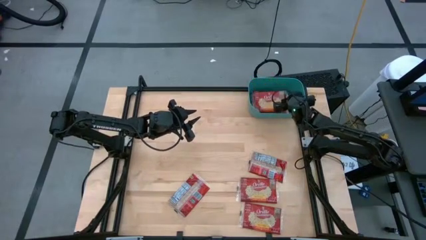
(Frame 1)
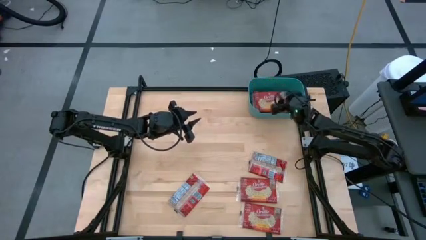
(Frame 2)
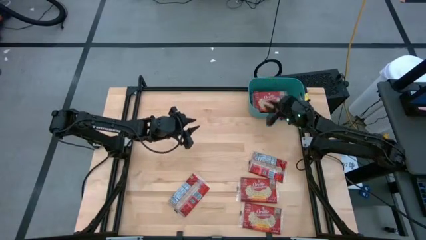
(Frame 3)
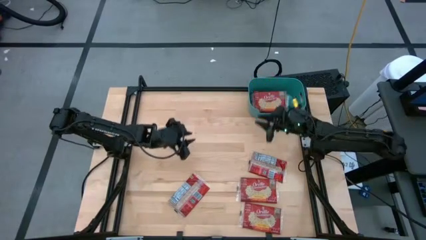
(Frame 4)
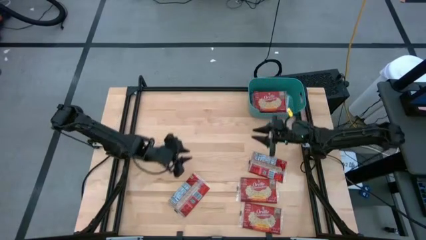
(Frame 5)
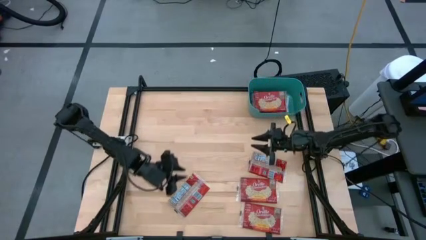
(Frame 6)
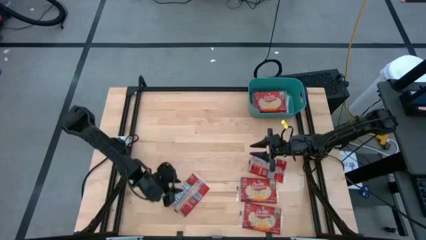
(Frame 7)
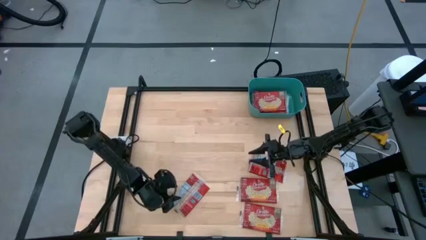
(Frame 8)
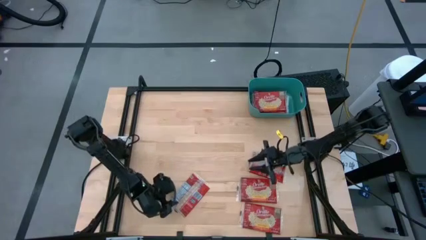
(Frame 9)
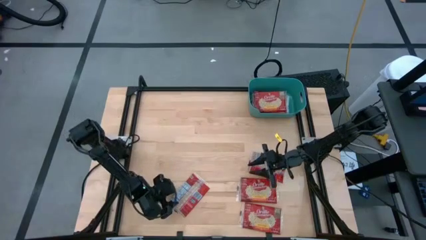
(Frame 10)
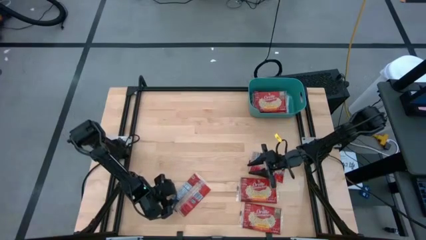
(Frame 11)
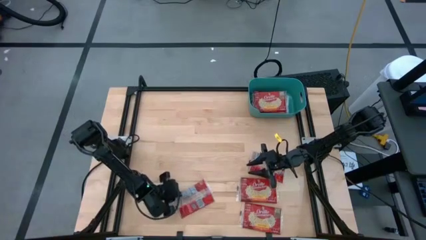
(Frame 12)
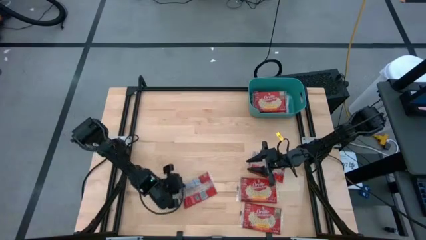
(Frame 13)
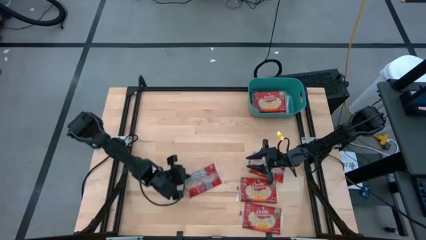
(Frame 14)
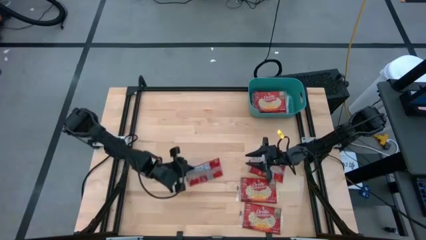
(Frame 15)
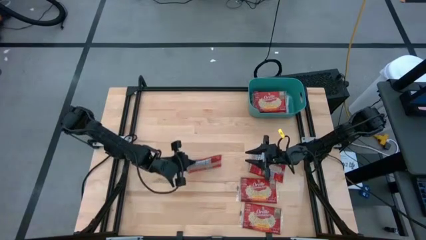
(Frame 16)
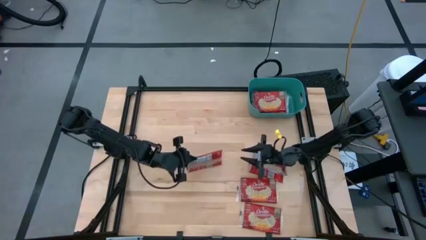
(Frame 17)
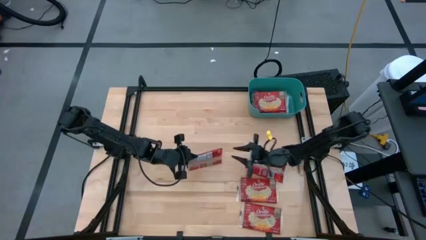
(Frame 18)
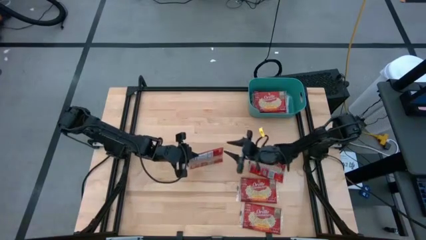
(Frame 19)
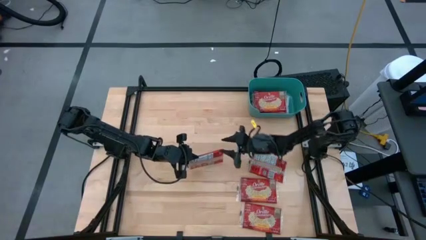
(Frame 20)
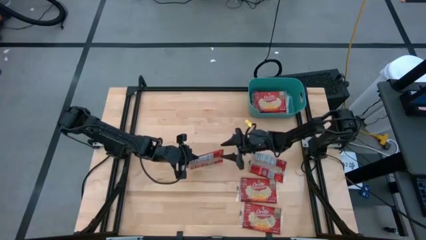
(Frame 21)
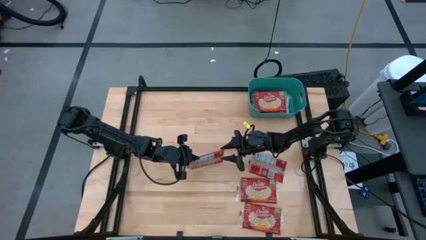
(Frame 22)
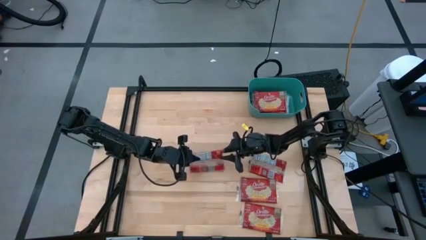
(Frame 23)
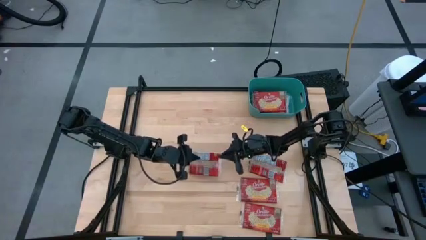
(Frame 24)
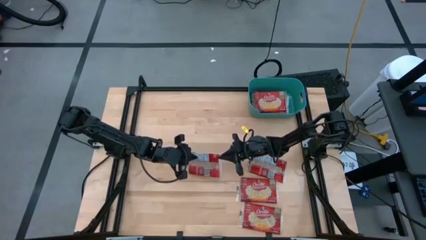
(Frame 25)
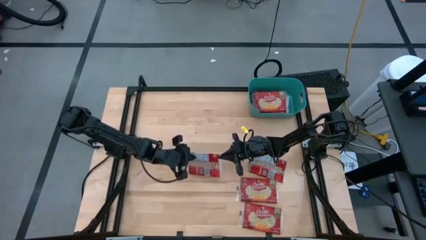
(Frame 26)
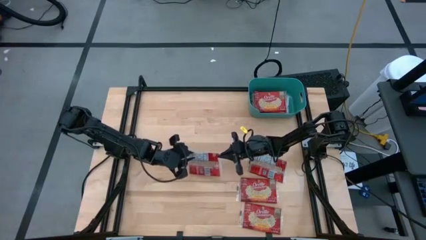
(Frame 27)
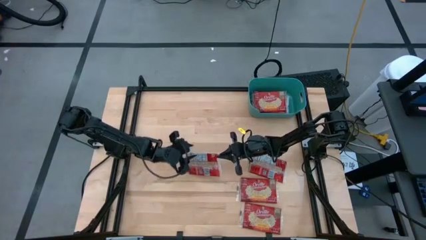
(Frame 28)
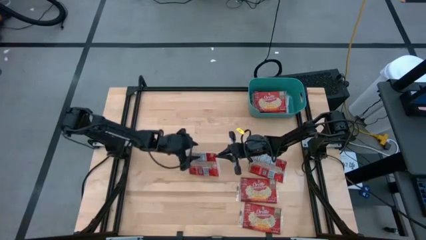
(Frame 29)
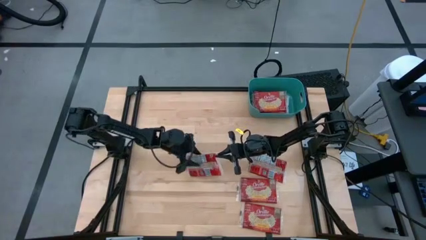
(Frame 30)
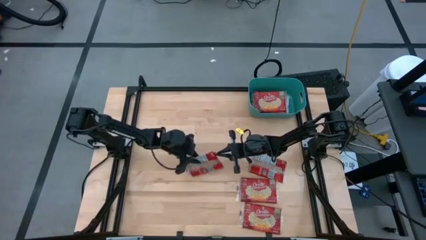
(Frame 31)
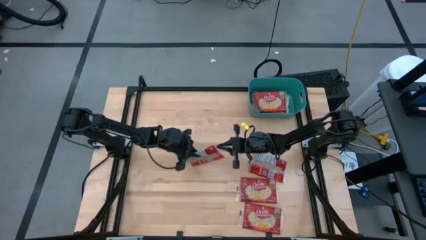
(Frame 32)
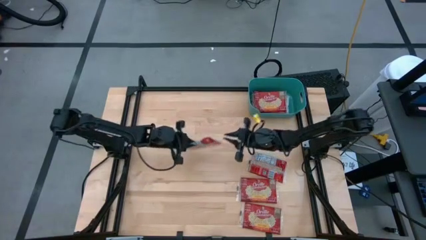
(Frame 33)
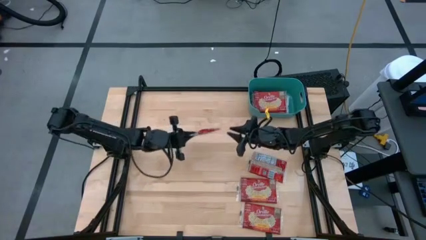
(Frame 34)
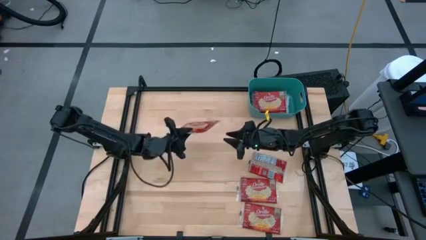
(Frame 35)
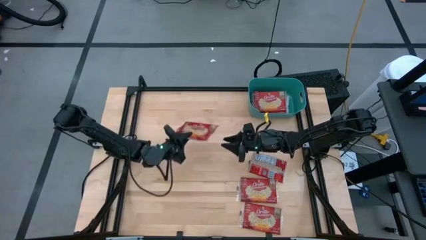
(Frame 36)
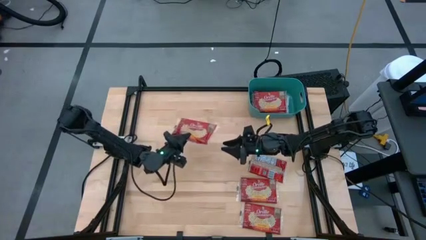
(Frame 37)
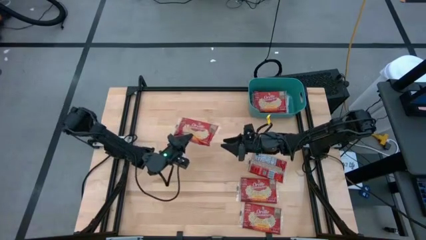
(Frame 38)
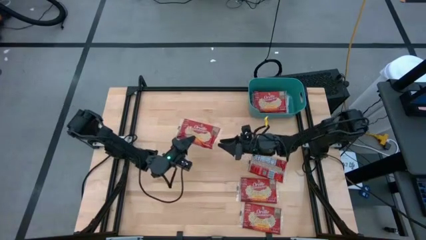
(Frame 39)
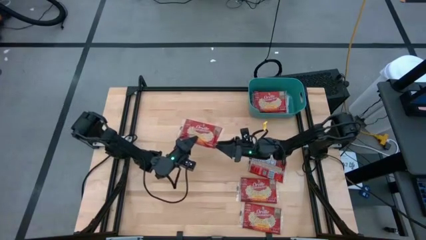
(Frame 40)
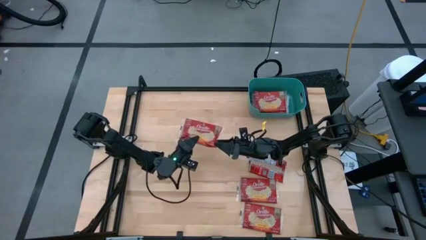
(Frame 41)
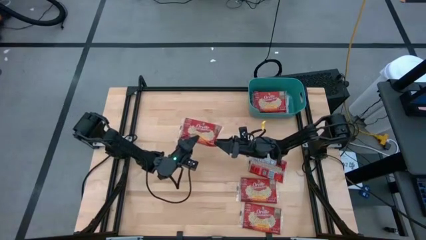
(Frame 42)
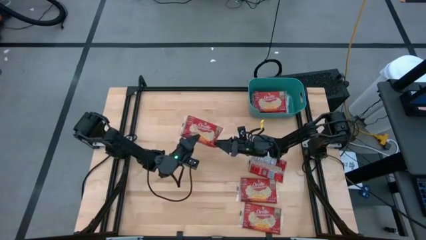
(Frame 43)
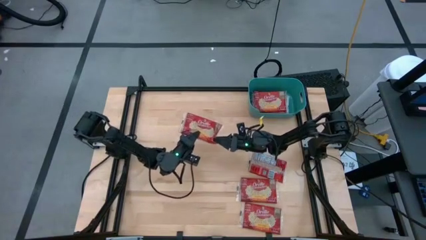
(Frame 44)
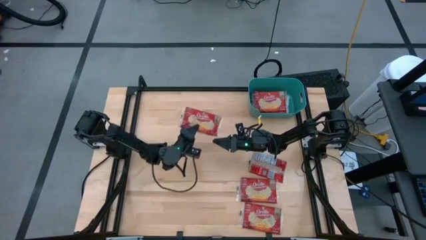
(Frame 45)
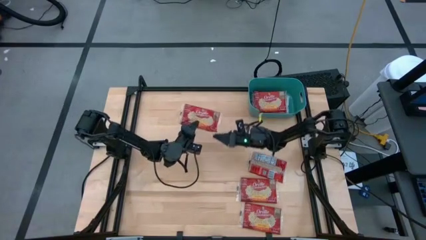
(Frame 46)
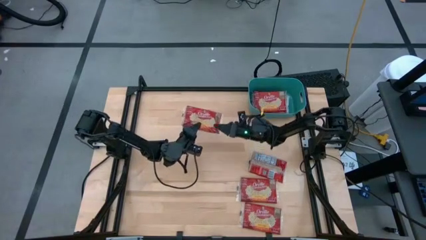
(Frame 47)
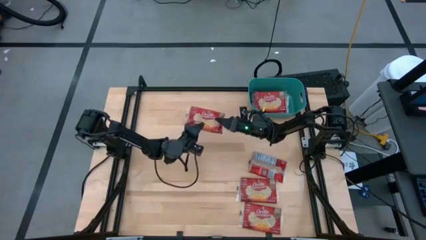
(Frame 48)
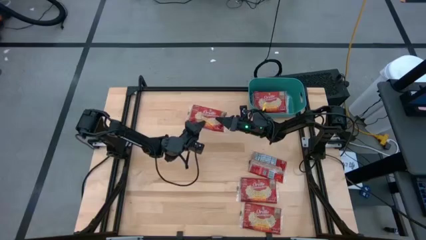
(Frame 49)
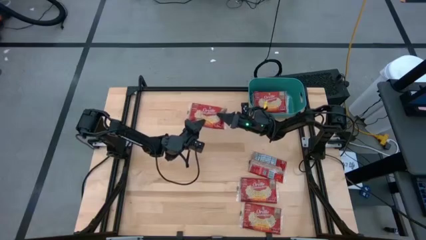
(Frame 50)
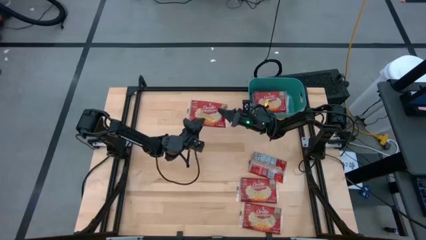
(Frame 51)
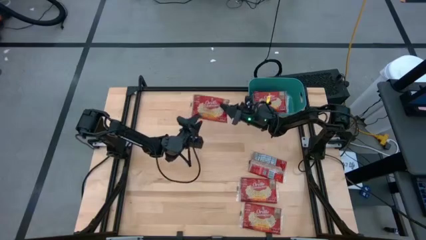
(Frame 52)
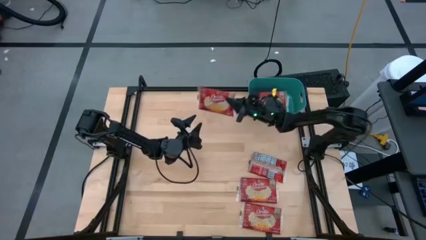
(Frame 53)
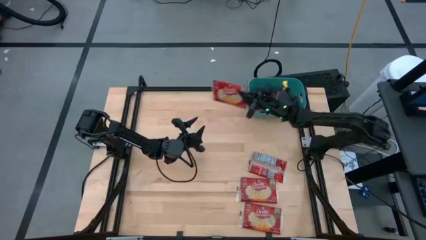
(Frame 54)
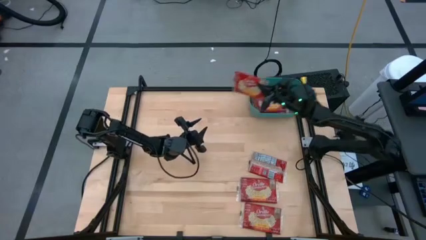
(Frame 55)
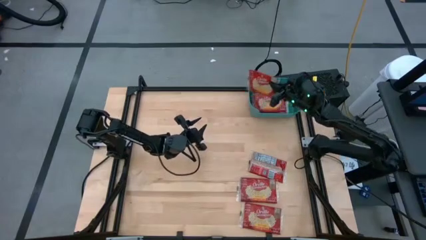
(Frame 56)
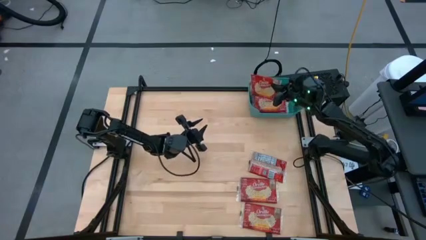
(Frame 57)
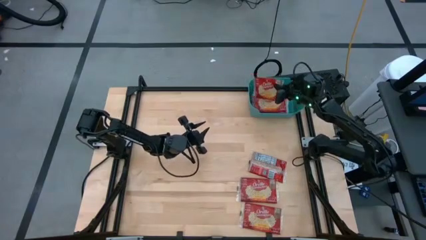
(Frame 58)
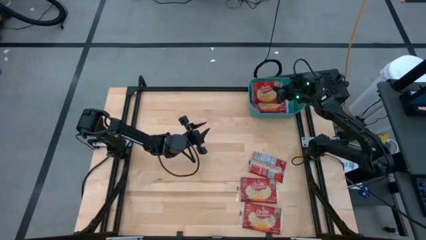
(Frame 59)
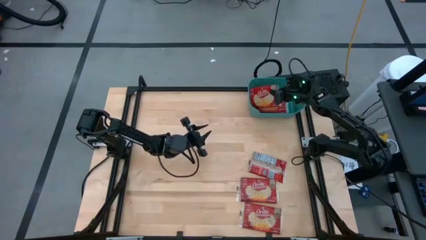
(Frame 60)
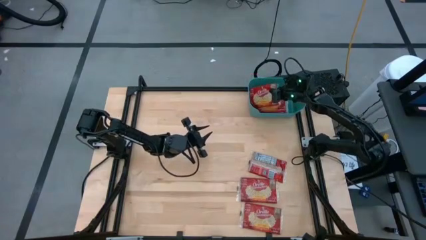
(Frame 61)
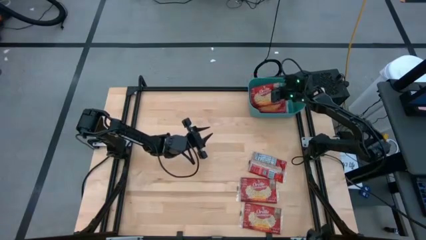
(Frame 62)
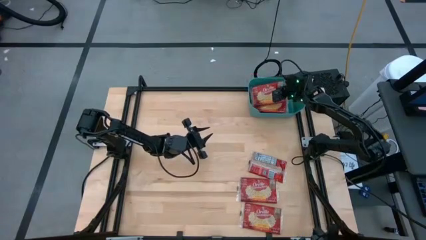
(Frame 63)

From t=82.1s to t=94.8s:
Task: Sort popcorn bags into baskets
Put the red popcorn bag into the blue bin

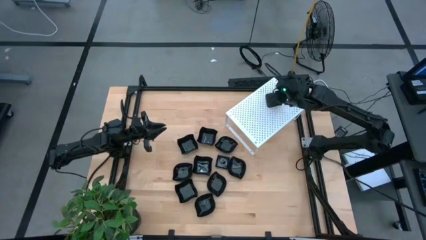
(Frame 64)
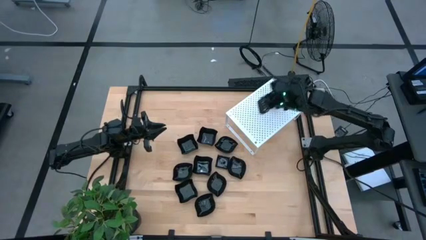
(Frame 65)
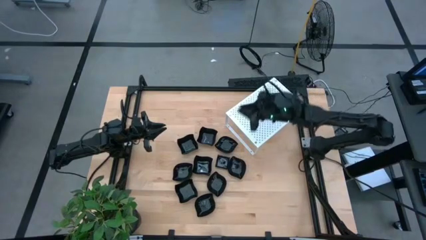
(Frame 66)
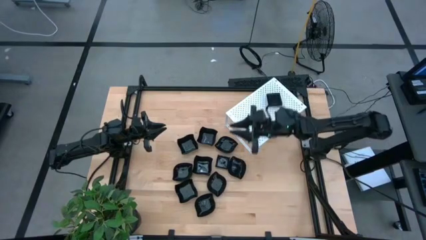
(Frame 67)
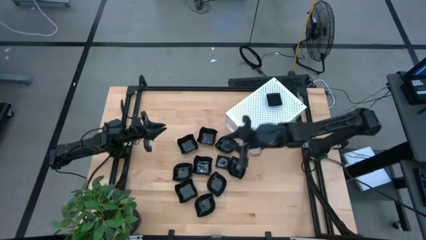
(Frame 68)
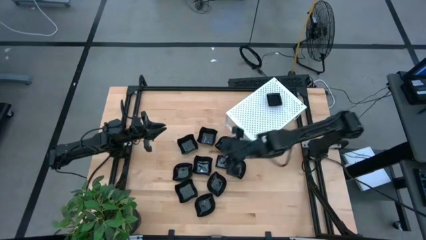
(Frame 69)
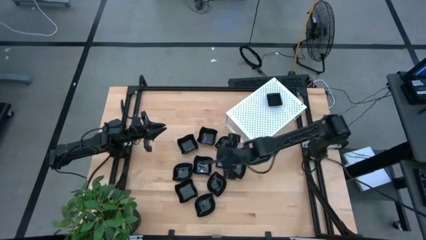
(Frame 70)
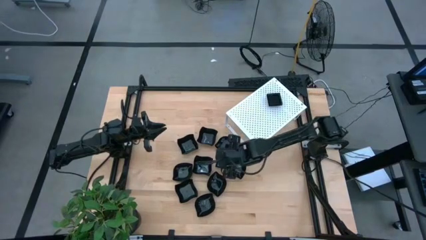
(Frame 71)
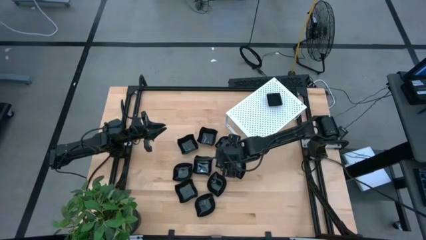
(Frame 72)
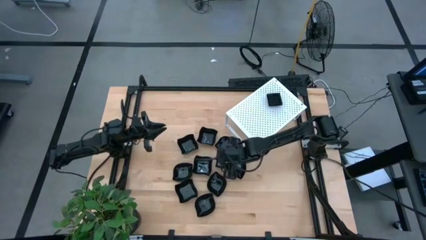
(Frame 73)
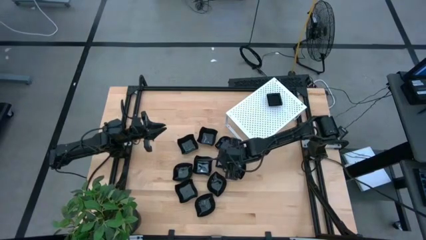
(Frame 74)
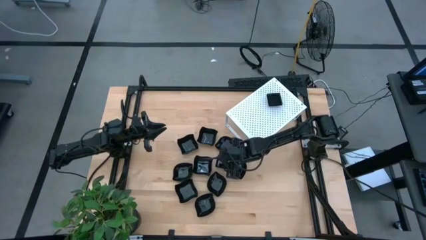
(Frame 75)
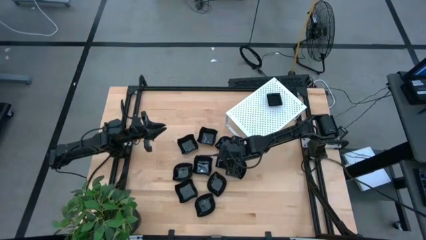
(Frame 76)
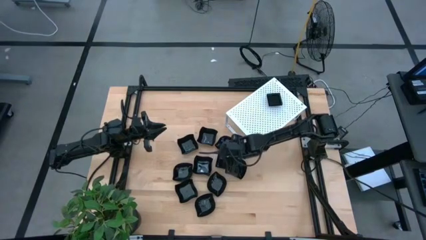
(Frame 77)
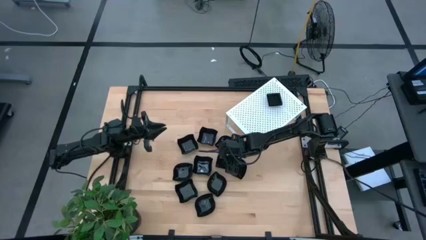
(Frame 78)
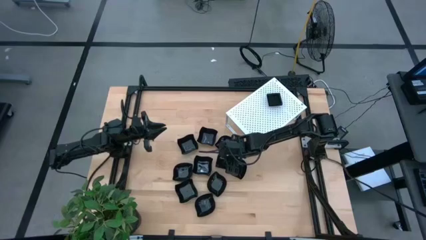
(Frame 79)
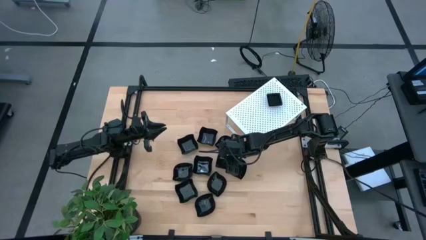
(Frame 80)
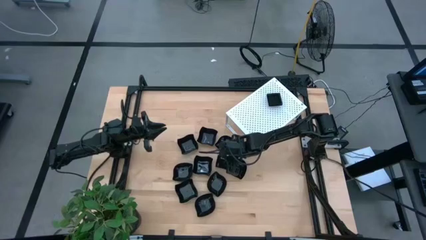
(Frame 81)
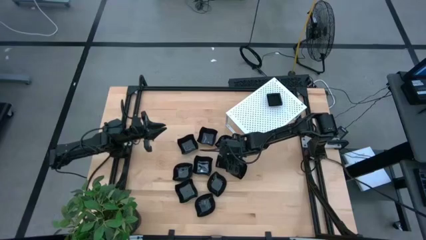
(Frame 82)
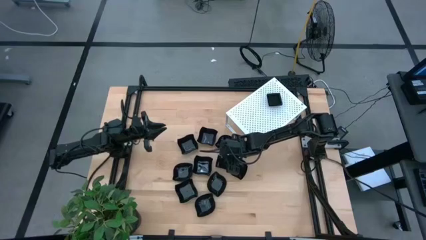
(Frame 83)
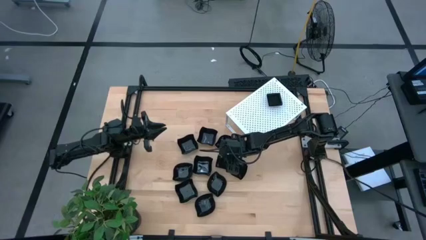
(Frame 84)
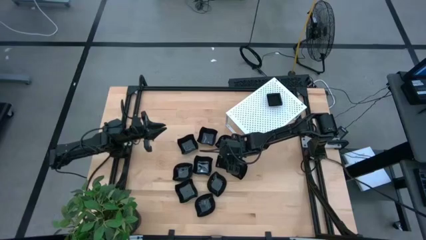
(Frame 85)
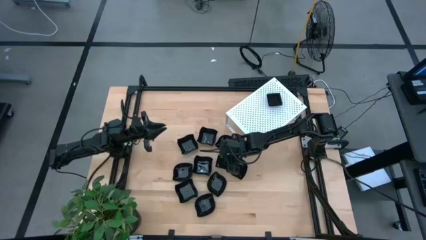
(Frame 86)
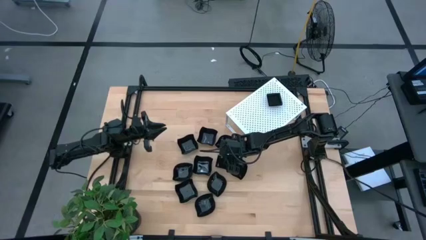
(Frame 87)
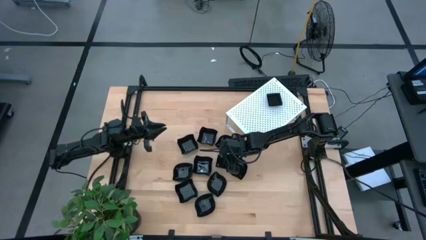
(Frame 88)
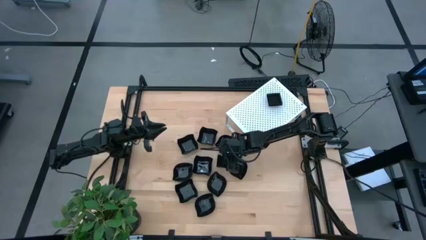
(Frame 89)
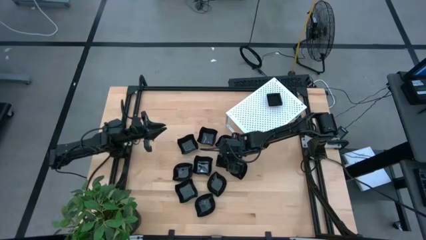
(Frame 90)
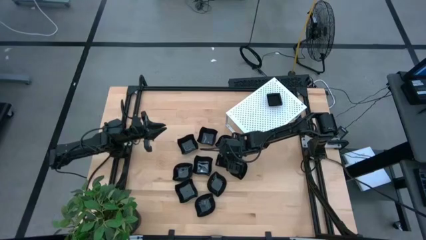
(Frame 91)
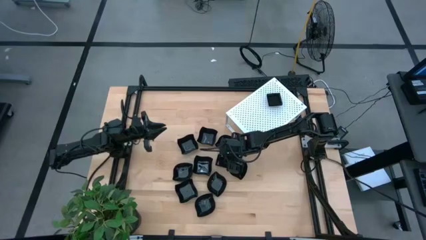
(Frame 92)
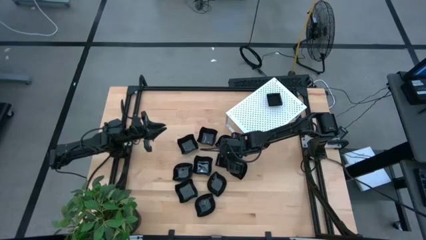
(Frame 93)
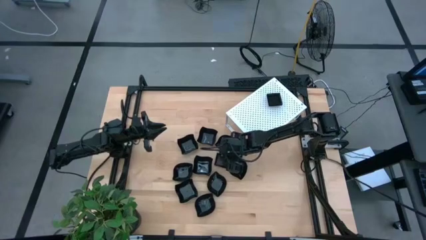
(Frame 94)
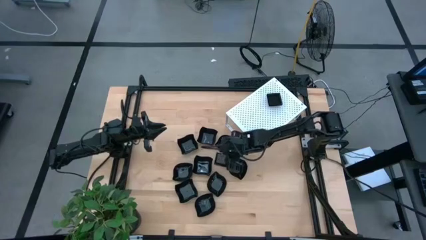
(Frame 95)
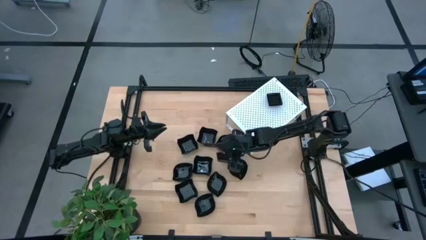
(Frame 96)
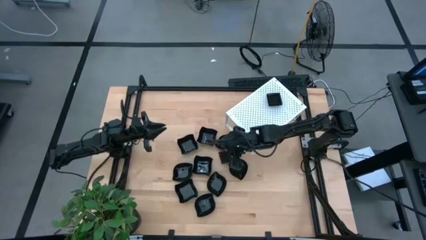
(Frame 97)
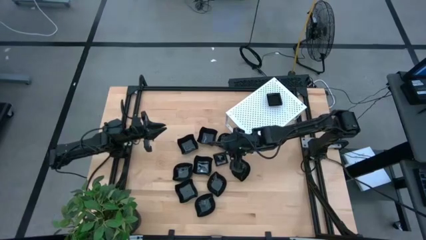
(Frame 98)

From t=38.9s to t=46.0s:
Task: Pick & Place Mini shaped plates
Stack the black square plate on top of the black square plates on the shelf
